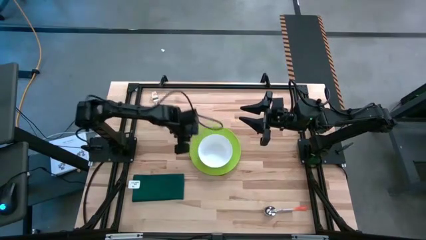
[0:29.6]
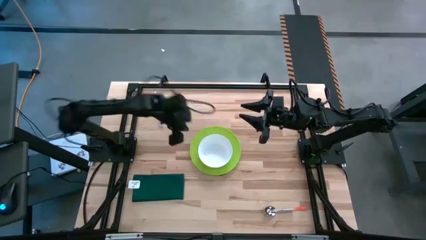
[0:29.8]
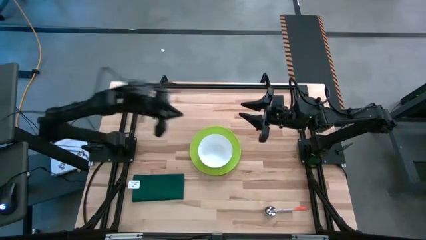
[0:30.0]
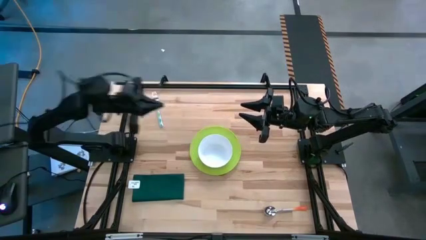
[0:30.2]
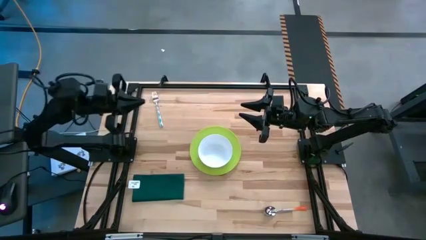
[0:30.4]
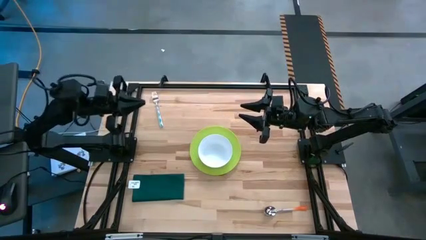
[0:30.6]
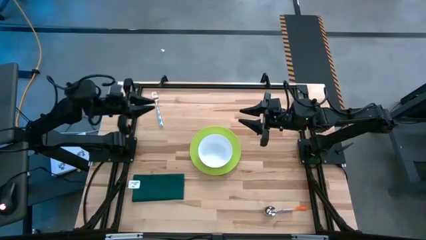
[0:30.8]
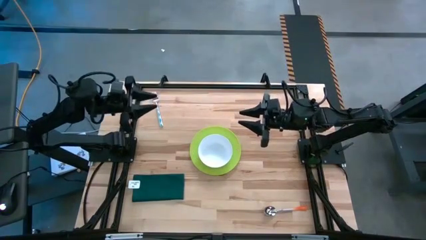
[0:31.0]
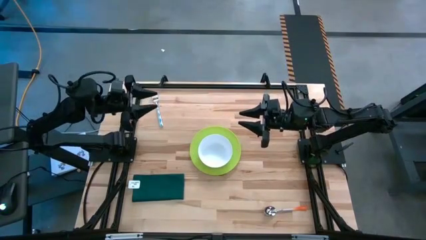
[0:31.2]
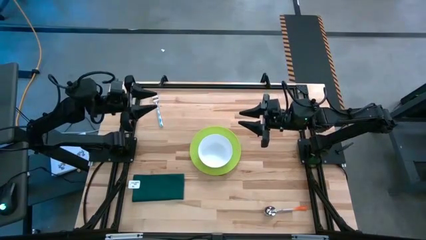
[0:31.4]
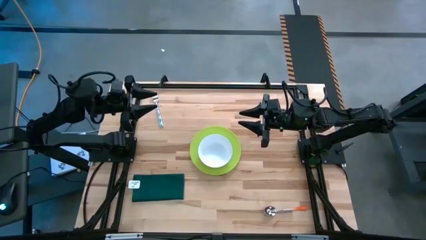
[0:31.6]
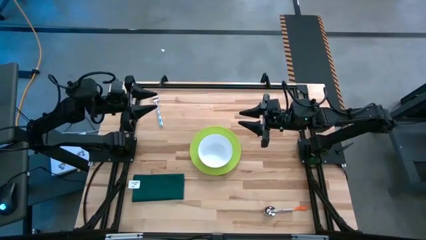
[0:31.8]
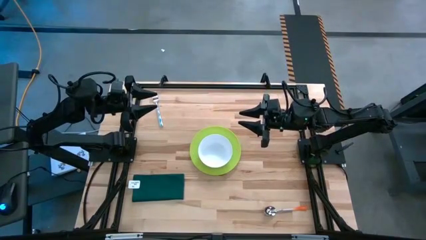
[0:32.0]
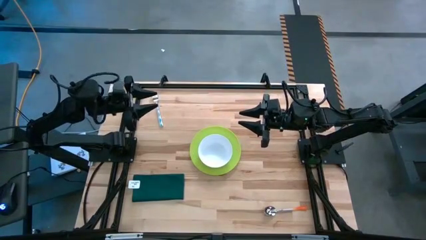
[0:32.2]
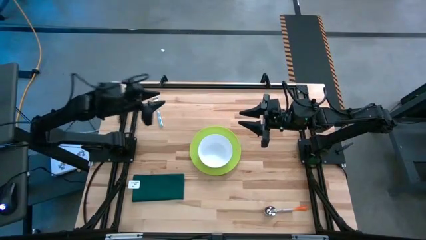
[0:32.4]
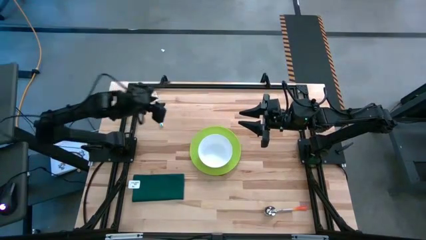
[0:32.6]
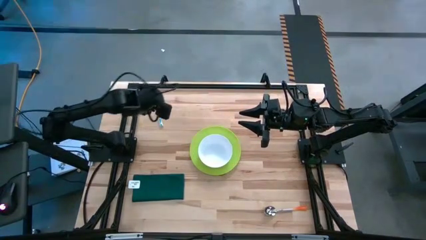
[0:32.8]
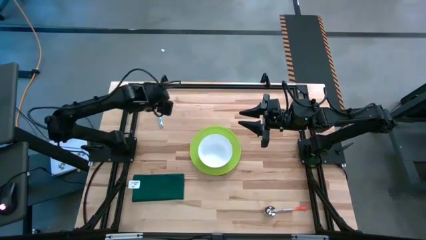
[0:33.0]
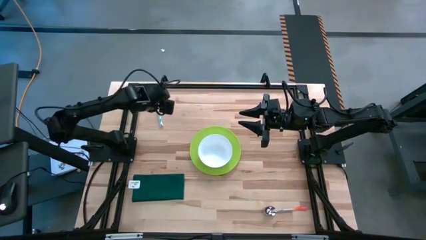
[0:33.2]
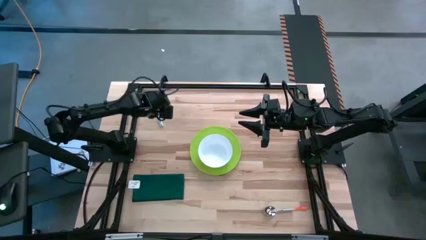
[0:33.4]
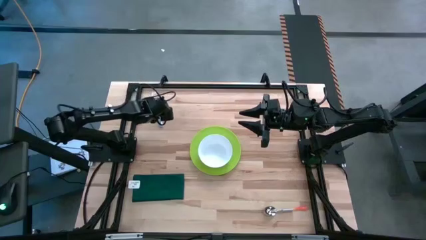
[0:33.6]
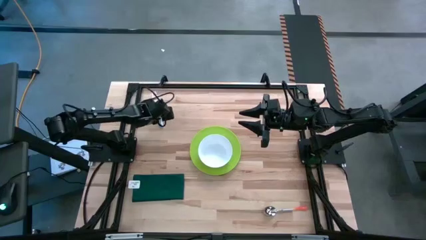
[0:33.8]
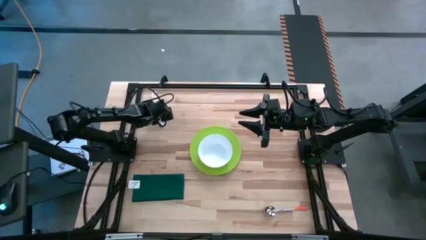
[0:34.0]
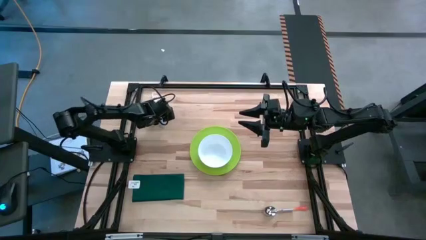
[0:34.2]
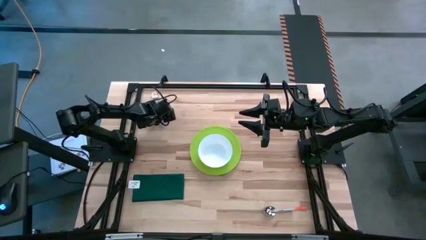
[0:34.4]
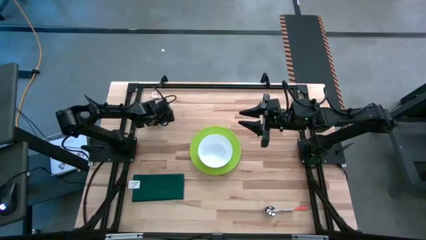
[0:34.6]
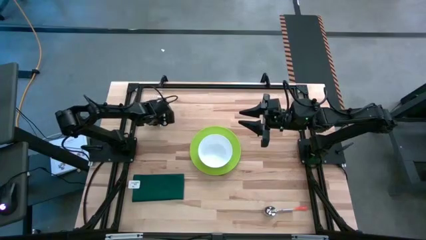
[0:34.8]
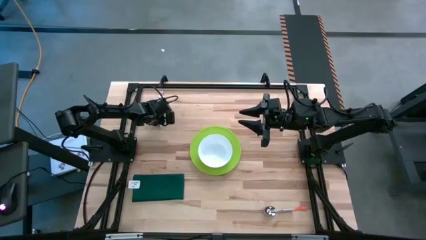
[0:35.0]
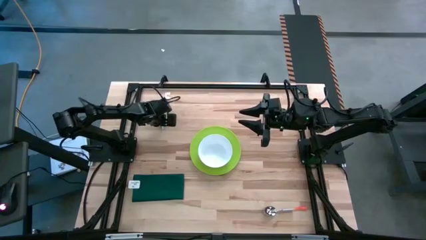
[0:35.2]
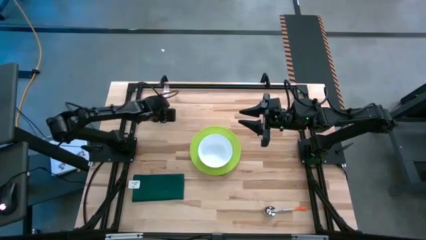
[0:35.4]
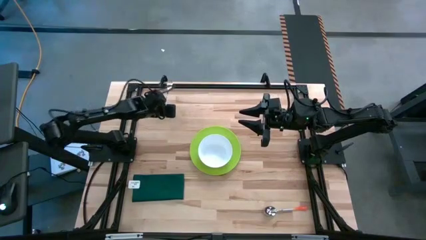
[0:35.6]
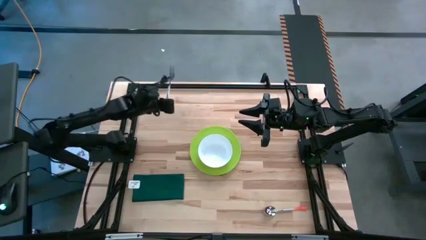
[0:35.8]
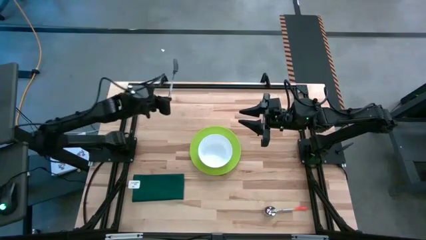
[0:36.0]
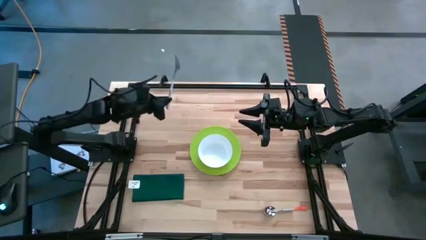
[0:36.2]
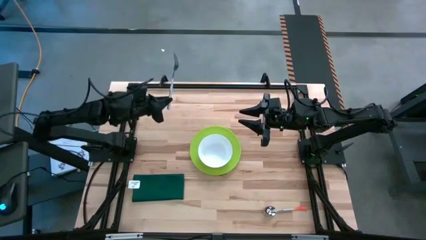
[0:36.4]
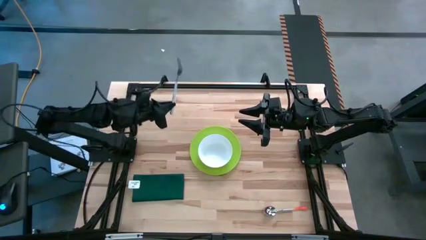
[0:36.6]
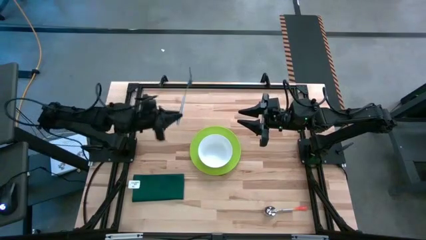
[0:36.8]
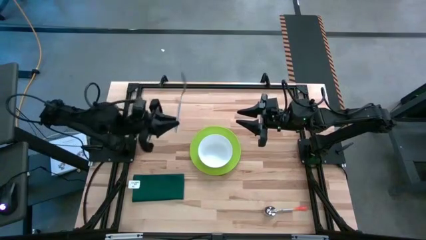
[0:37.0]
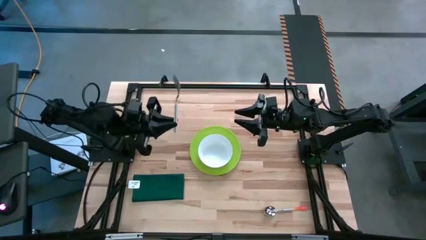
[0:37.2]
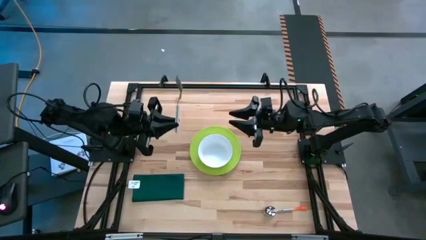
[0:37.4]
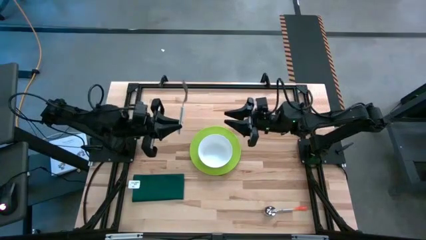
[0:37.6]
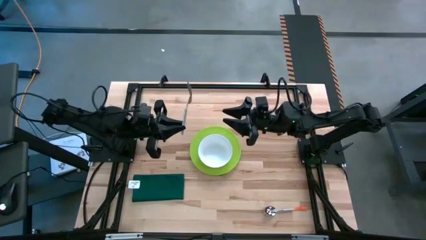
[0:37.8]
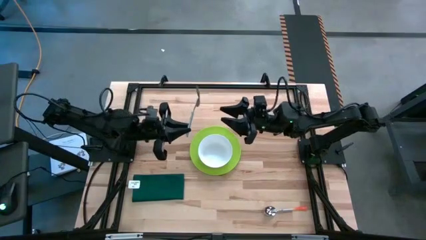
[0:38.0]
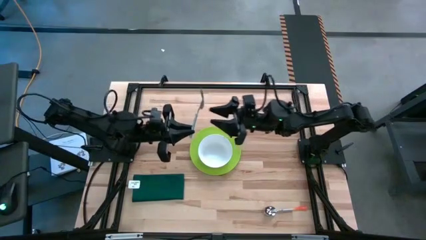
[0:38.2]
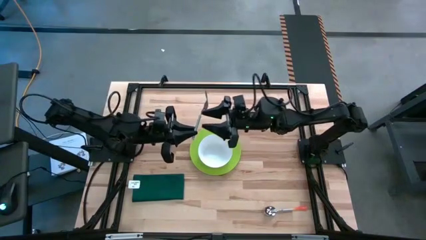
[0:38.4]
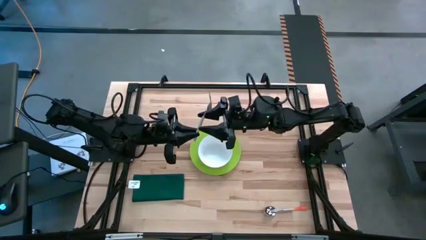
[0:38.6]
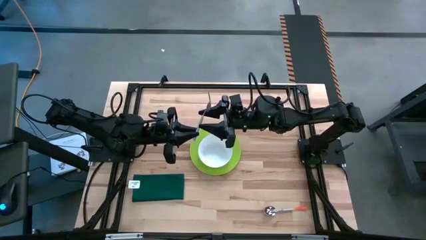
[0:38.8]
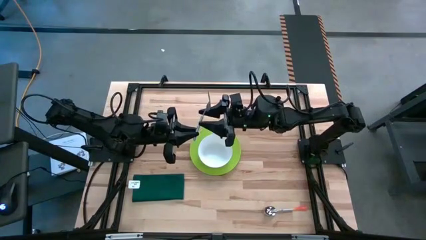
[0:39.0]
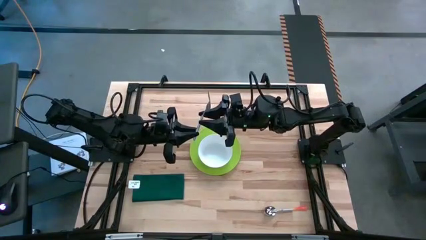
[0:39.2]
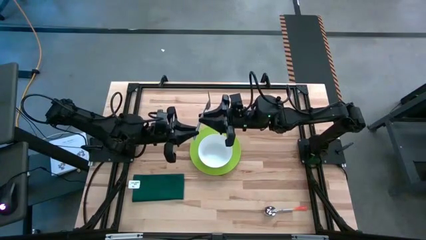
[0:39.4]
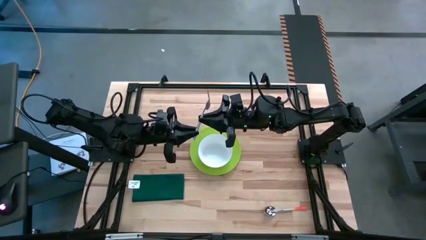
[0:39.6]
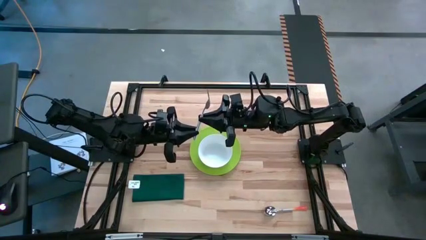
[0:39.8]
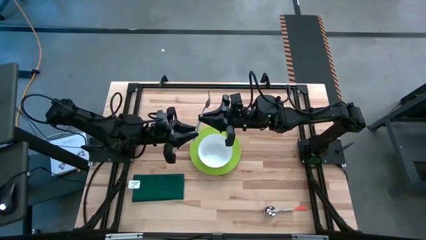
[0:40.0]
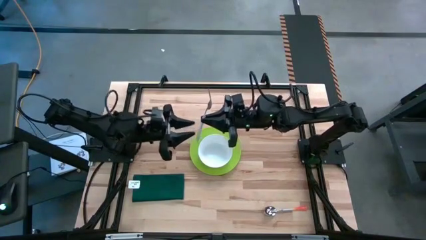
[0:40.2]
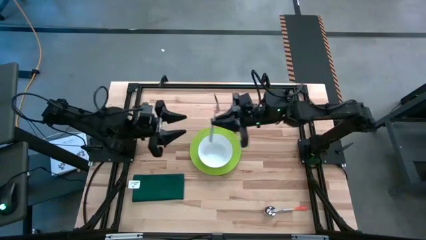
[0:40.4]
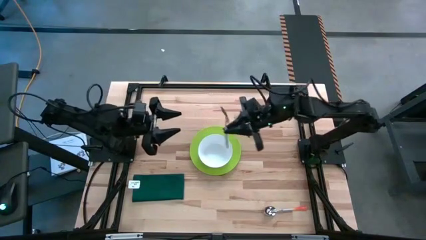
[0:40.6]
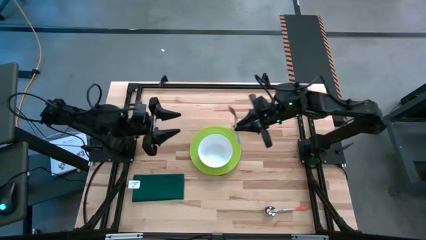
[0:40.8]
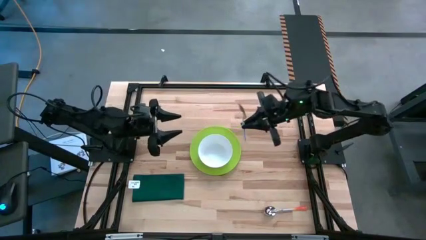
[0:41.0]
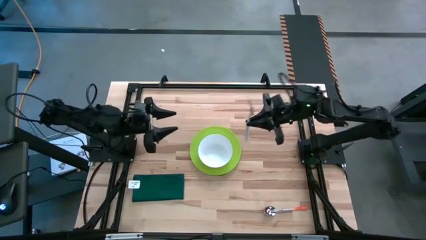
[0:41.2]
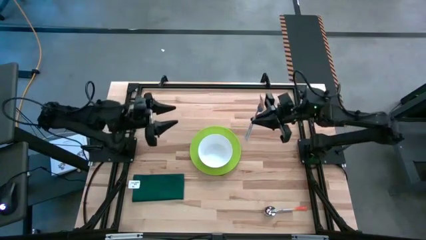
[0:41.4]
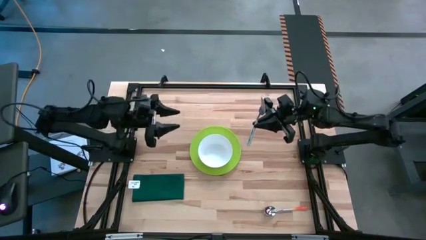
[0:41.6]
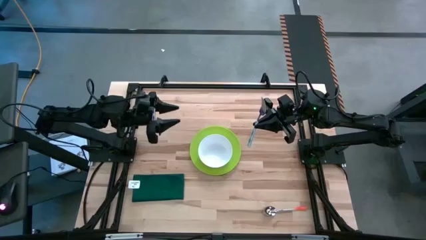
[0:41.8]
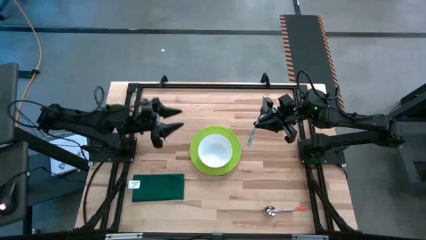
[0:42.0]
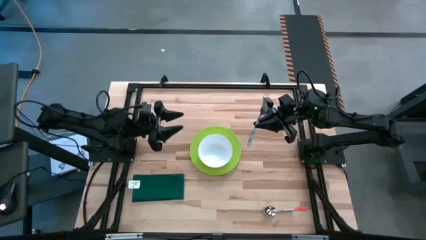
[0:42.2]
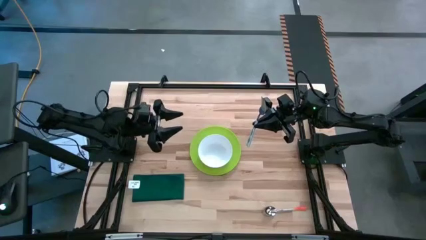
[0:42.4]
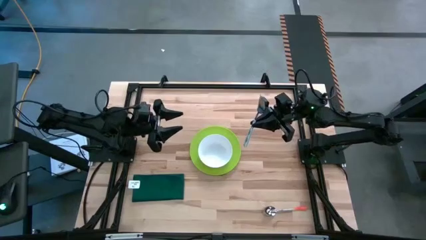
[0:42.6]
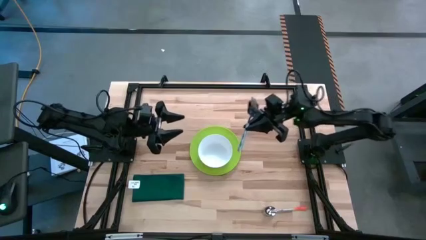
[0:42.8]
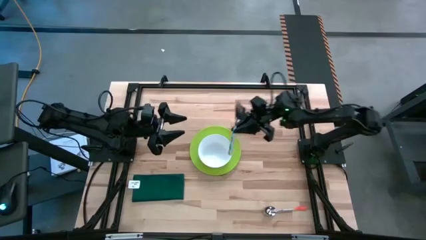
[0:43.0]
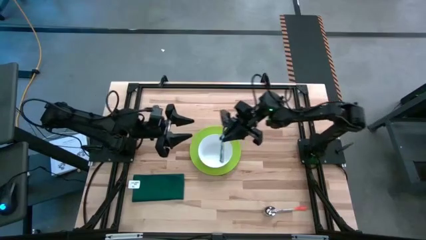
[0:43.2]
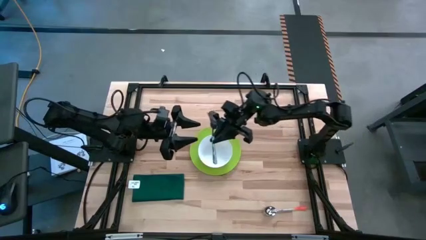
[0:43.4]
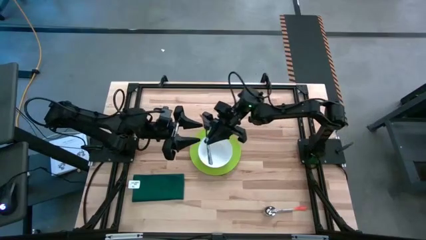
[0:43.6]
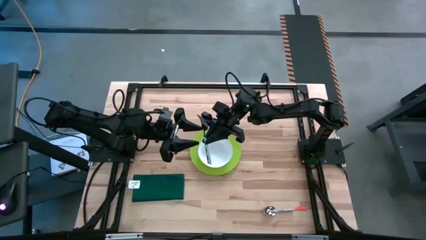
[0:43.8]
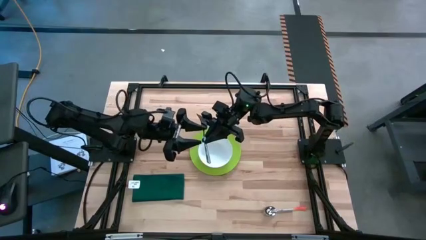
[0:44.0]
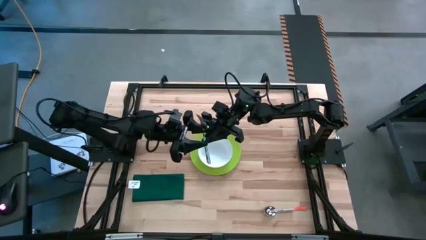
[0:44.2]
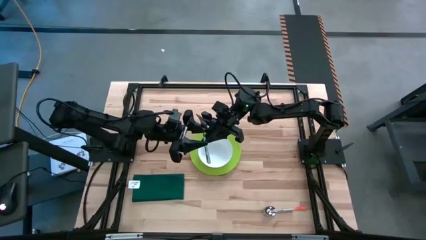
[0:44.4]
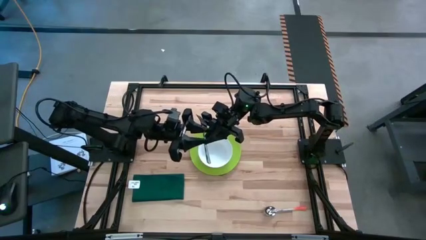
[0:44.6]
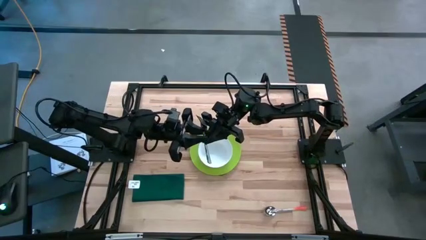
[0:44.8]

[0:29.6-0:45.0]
Task: Set table place
Put the blue fork beside the green plate on the table

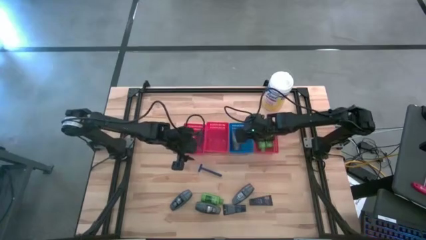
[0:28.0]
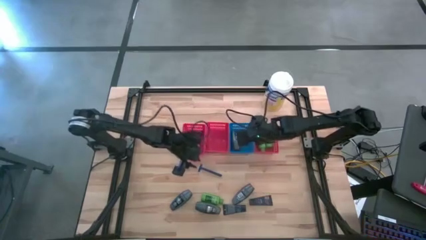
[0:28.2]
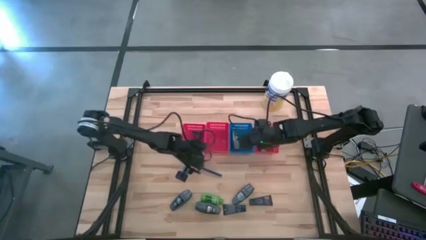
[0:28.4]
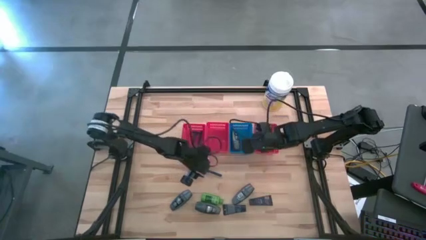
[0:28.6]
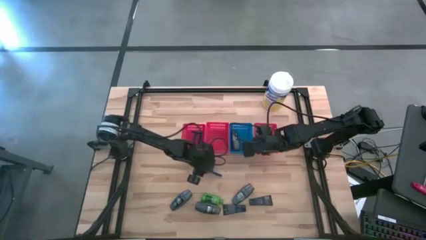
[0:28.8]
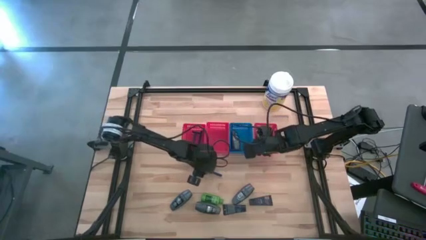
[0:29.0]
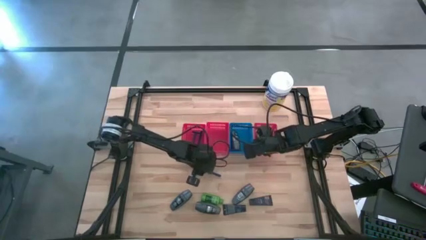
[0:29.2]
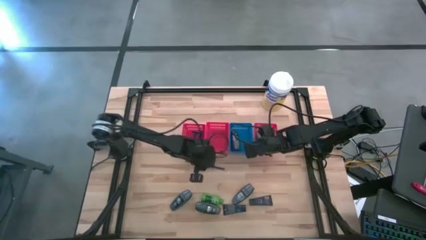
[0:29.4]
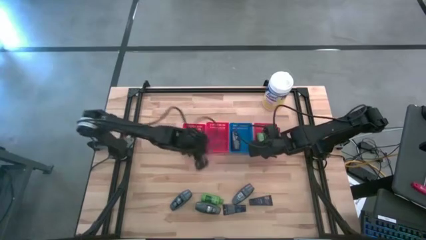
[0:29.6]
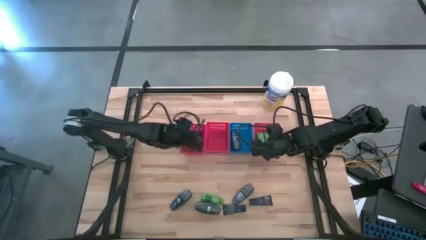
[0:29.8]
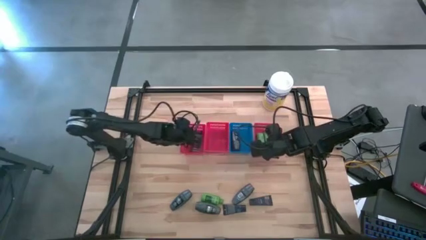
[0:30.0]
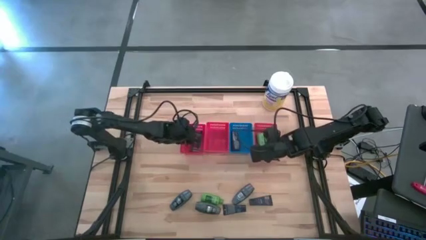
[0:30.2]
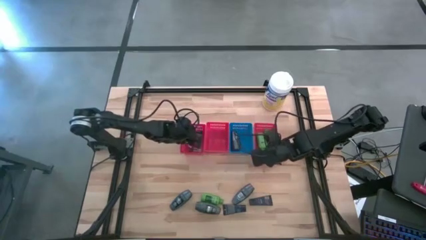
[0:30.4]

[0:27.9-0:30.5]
Task: Pick & Place Travel size toiletries
Put the blue razor into the left red bin
